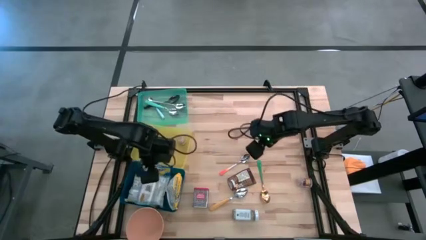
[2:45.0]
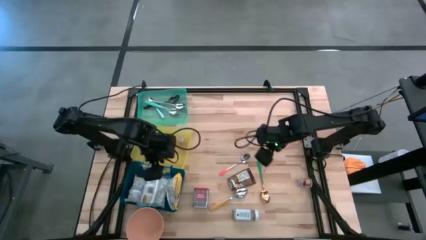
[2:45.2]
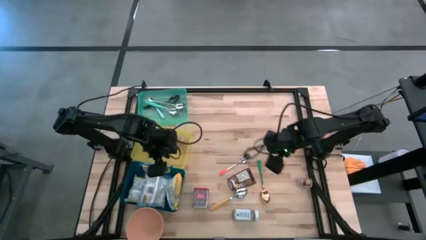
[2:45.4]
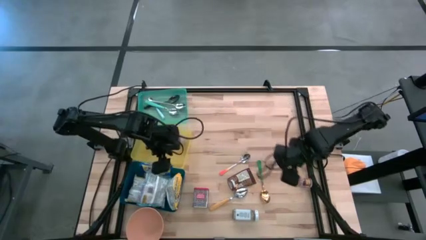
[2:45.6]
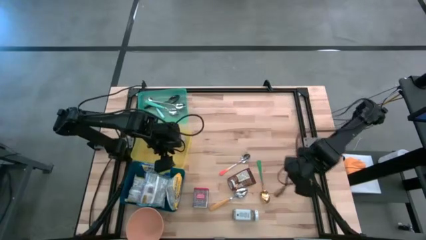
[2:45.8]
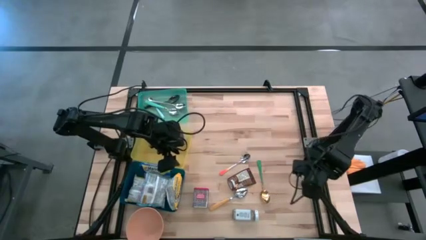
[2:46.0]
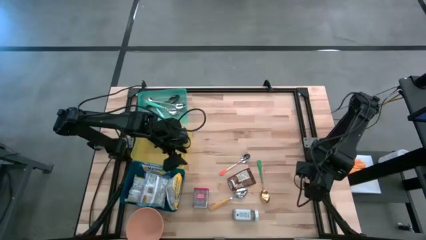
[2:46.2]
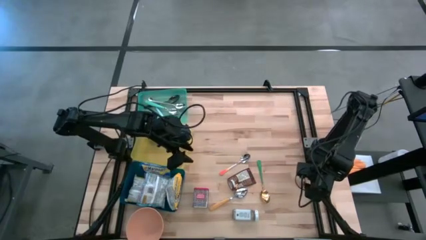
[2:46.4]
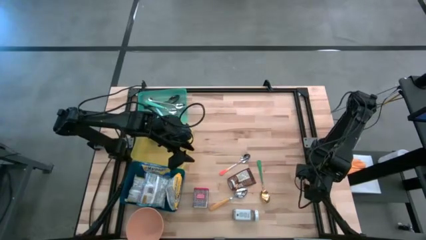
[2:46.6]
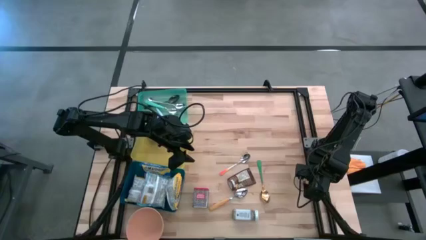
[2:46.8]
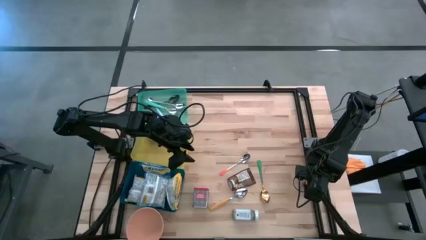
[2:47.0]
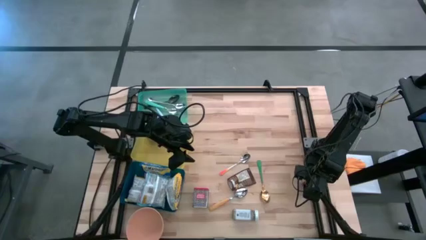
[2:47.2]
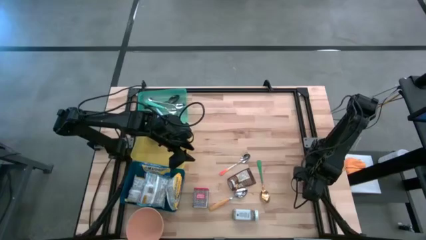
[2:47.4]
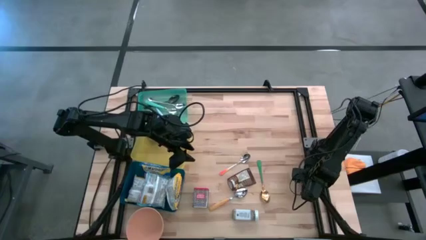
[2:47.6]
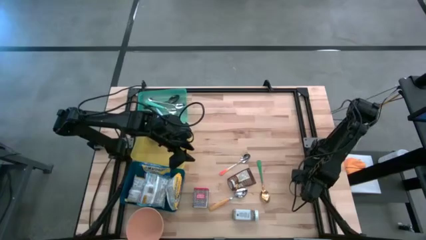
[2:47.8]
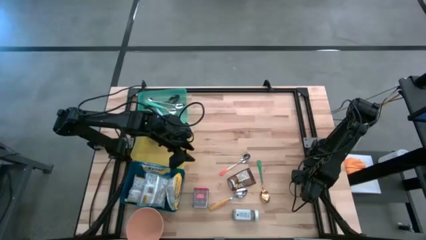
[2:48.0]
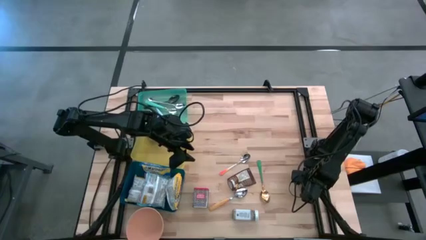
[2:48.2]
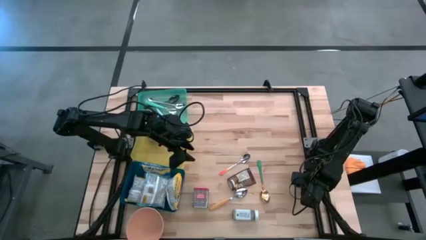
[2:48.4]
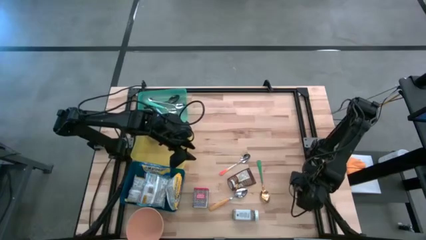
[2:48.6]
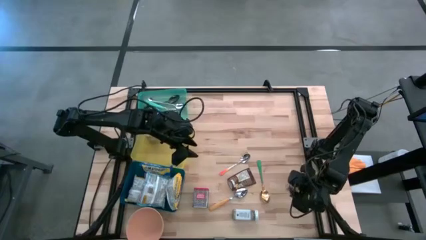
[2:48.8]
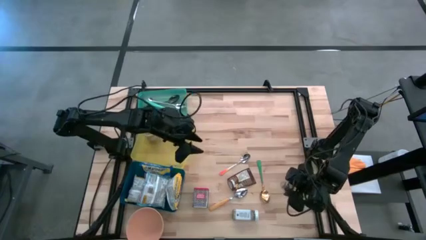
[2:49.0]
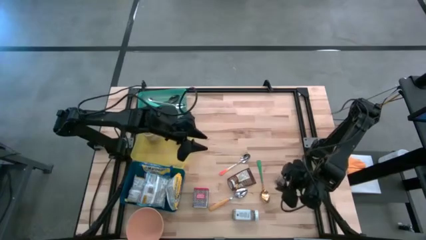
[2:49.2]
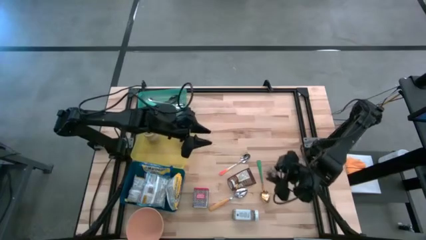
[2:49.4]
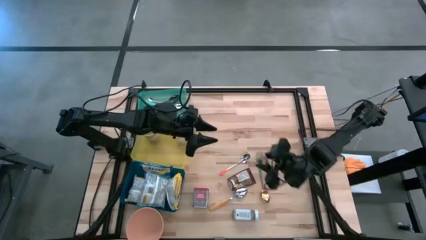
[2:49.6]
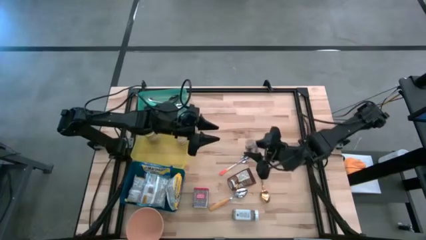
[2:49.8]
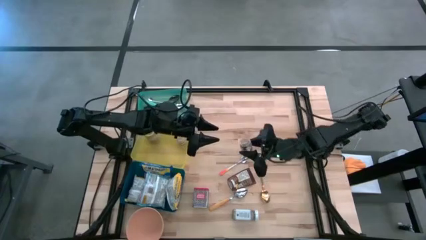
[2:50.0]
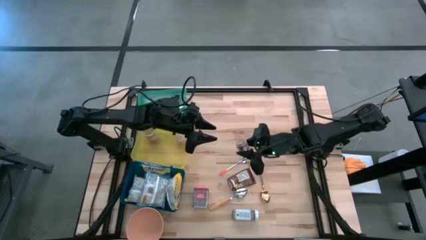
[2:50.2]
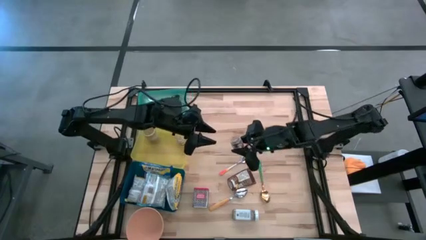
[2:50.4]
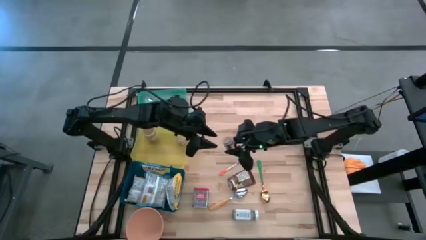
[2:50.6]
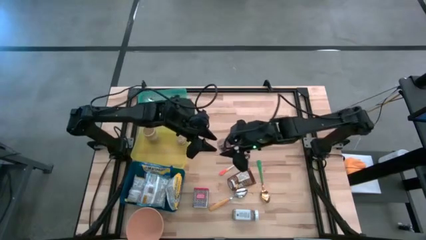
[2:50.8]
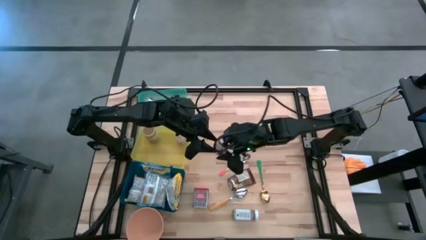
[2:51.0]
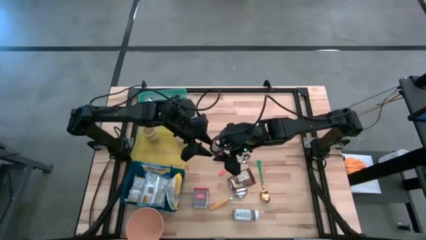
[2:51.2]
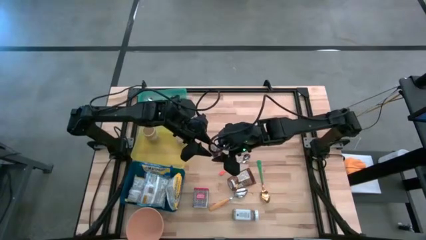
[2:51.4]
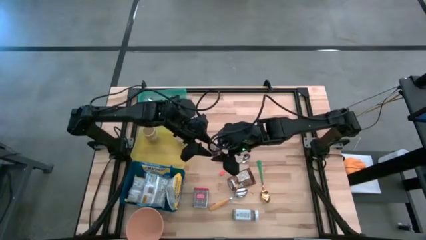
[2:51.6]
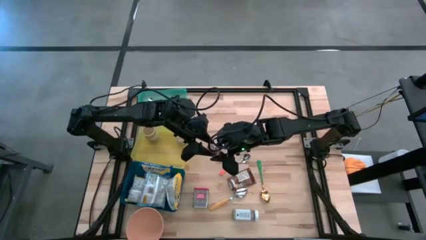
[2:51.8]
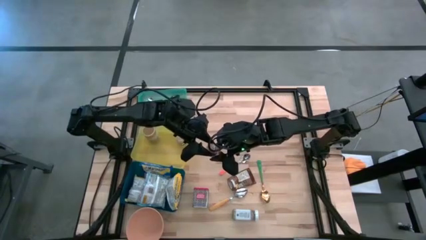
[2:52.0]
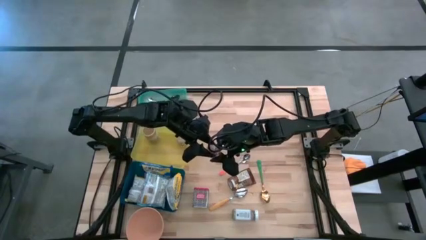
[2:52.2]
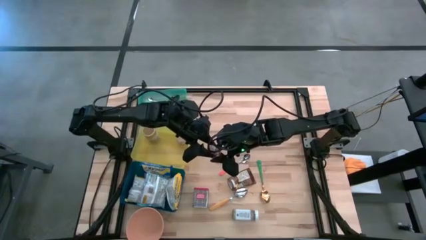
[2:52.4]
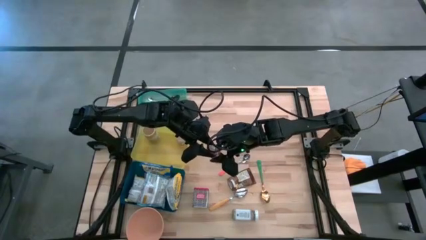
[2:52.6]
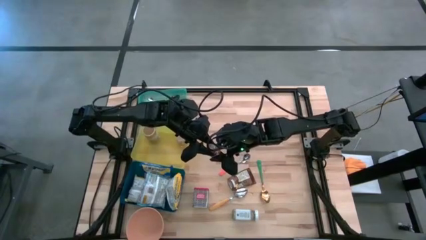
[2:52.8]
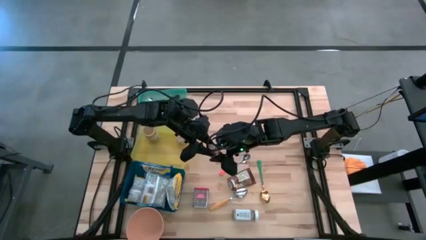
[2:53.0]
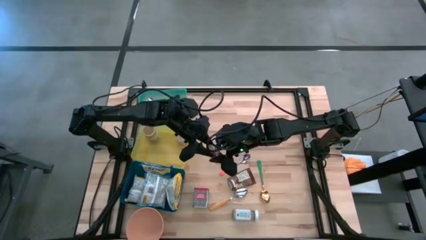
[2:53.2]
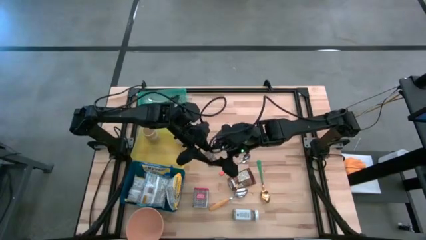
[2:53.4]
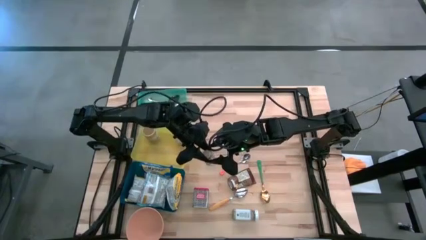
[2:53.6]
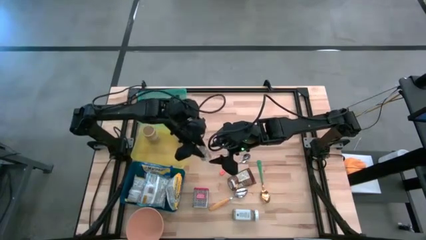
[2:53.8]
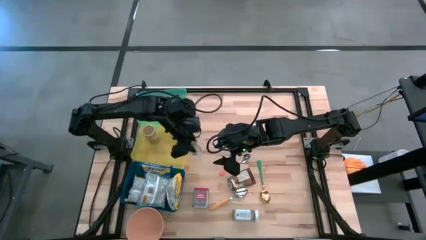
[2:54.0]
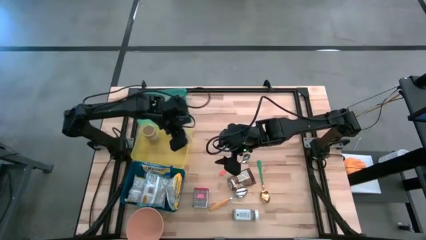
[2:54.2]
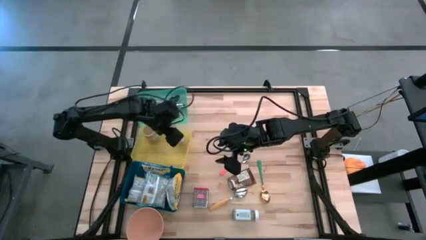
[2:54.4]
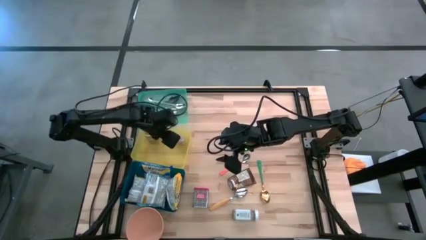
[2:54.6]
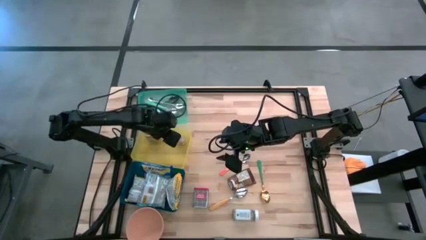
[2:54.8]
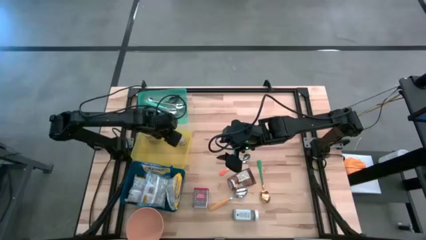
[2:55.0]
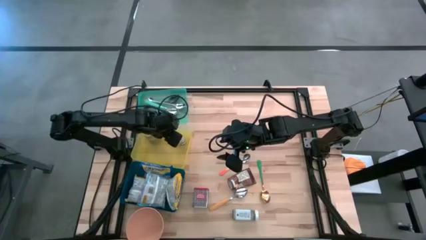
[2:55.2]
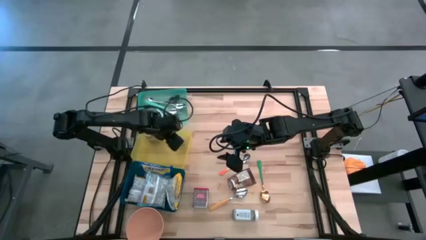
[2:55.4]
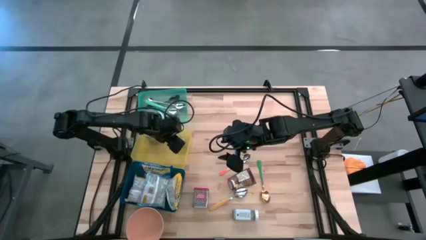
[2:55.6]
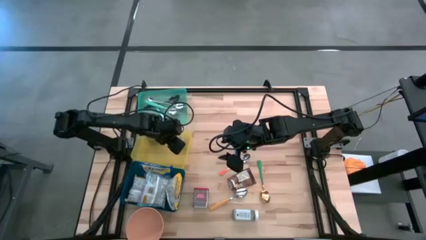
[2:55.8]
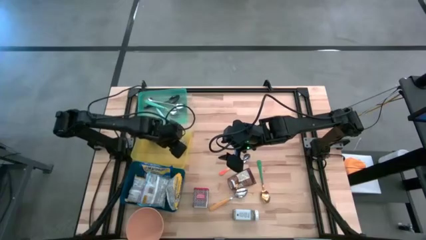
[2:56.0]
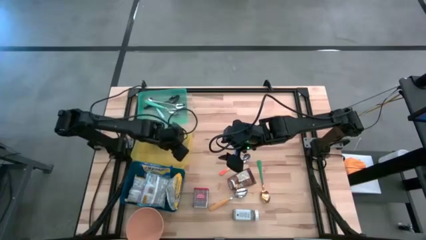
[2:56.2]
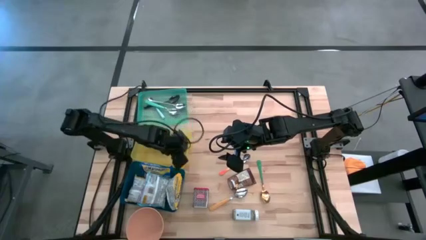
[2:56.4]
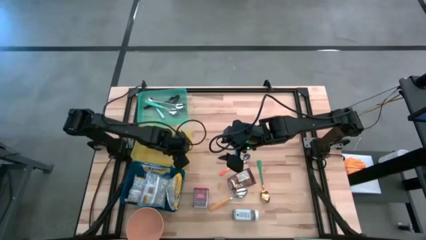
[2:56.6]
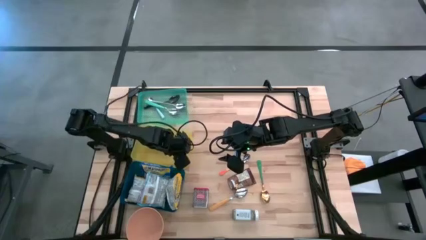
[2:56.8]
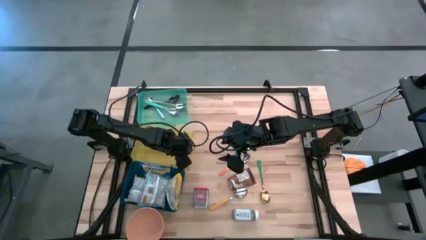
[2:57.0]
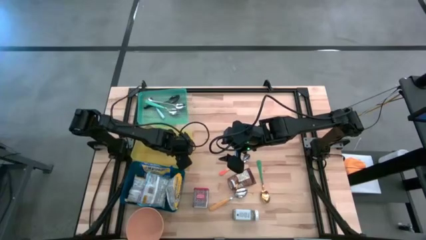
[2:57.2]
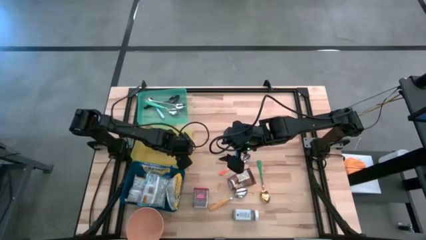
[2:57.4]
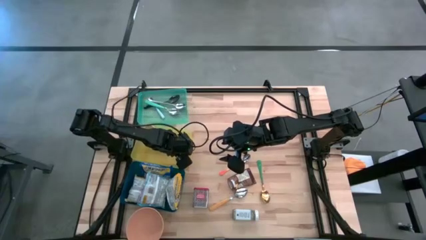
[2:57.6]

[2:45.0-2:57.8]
Put the brown seasoning bottle into the yellow bin
